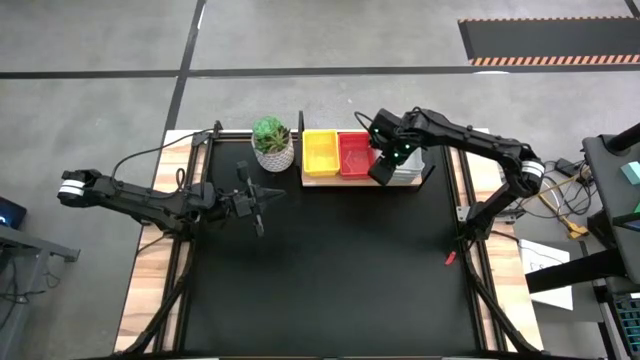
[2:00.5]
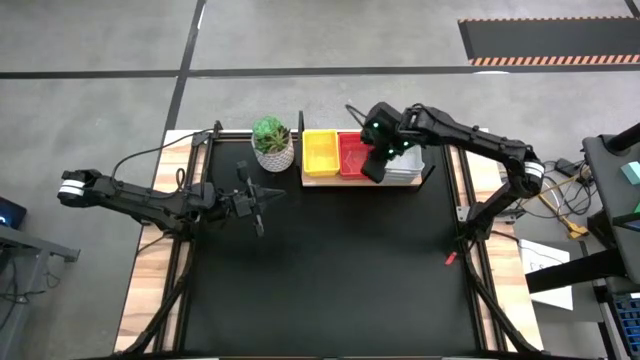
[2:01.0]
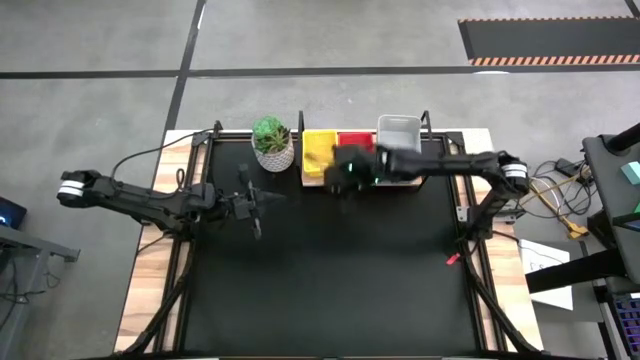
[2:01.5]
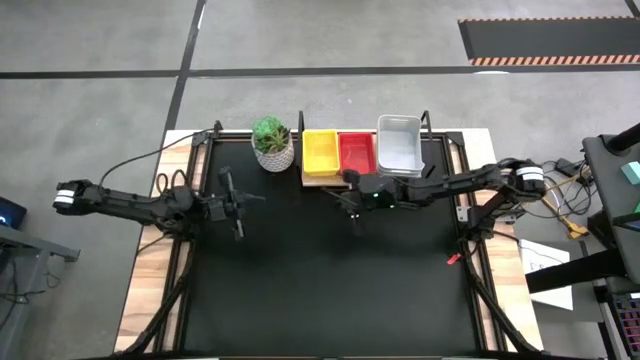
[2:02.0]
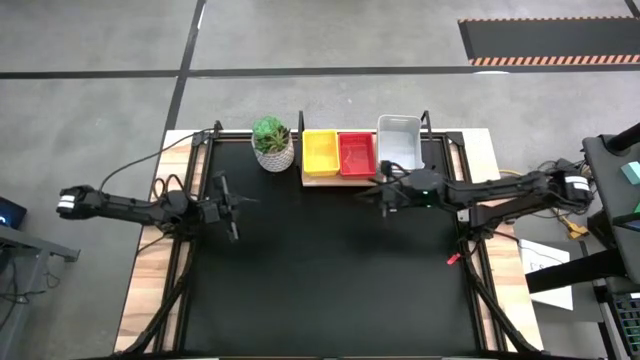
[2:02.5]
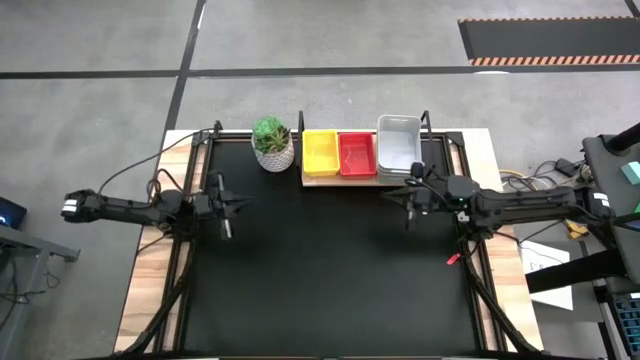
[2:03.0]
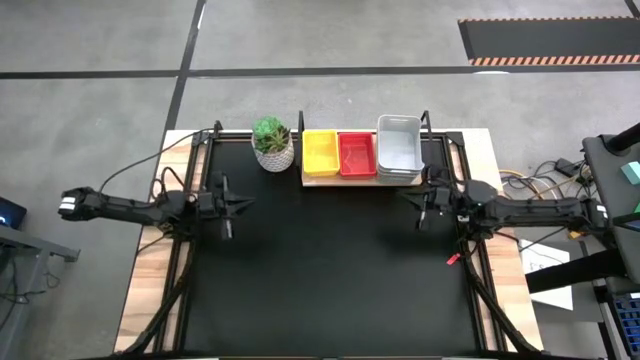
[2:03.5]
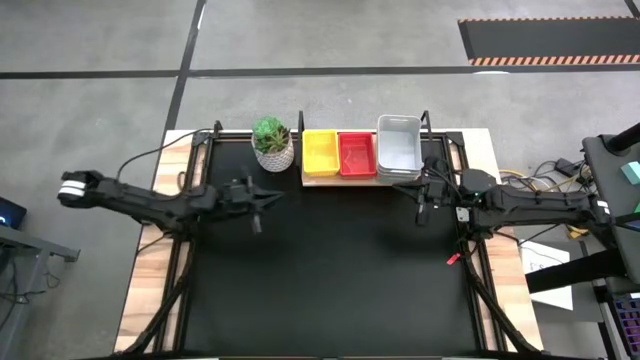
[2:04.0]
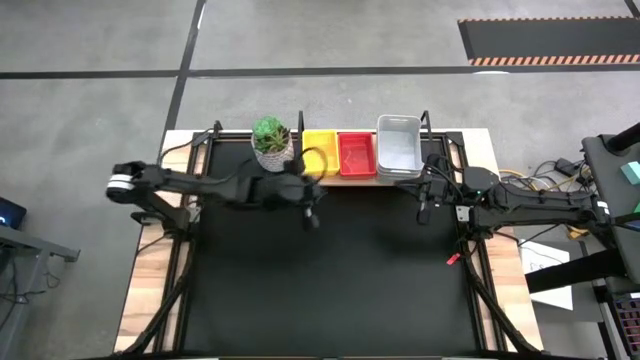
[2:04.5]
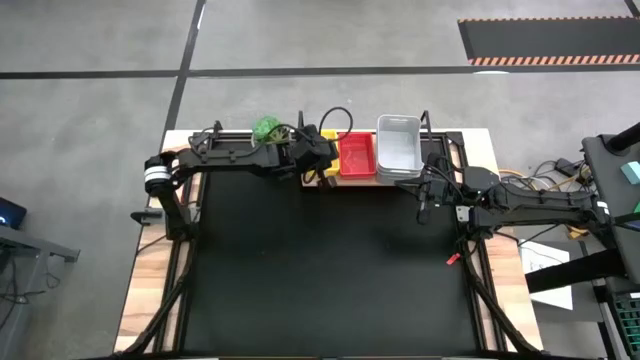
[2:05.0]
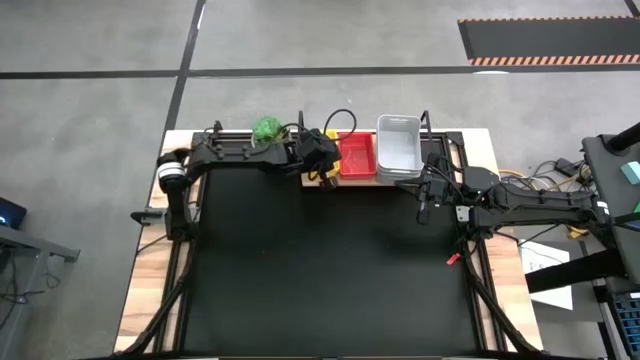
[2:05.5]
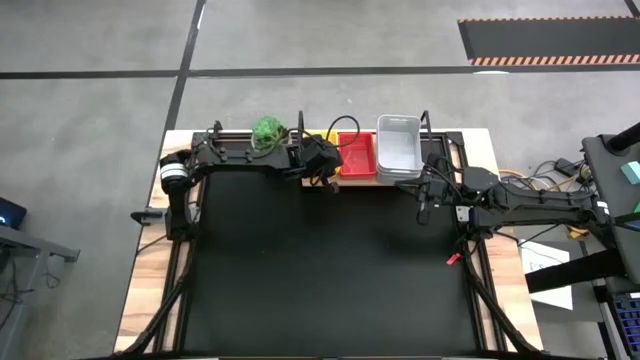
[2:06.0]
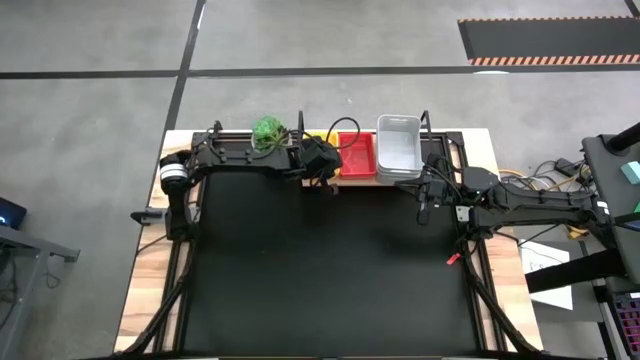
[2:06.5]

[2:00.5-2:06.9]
Task: Stack baskets on shelf by color
Adjust the yellow bin on the shelf

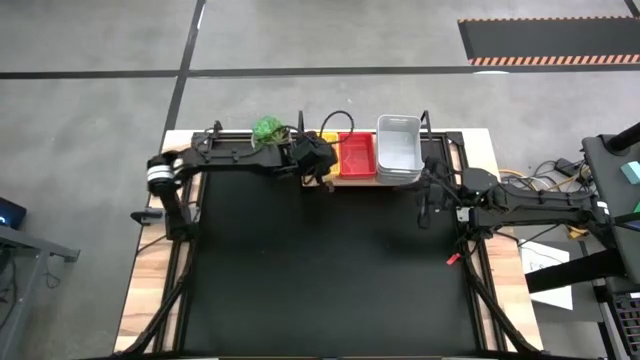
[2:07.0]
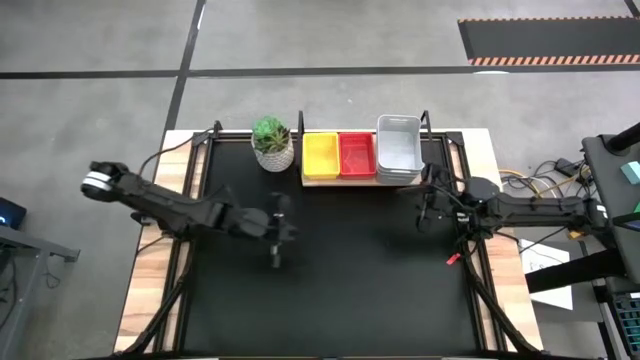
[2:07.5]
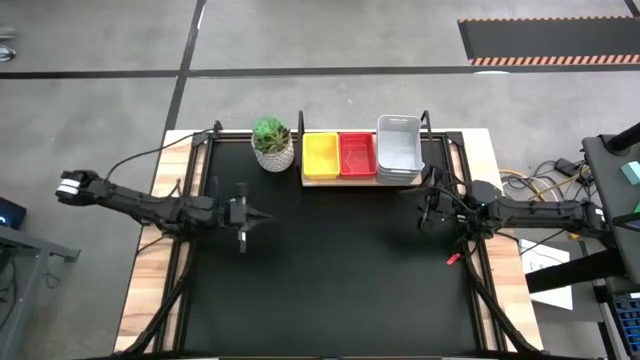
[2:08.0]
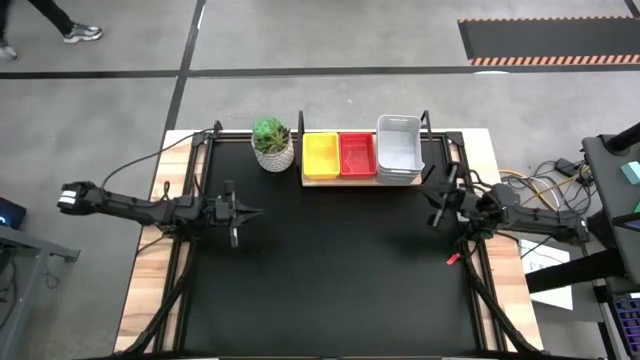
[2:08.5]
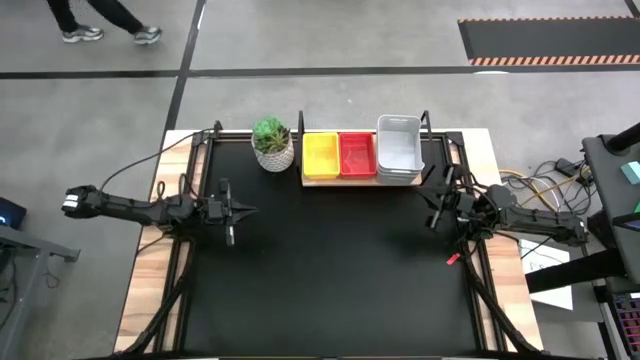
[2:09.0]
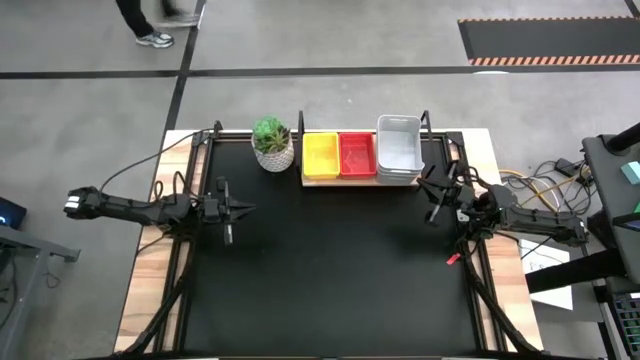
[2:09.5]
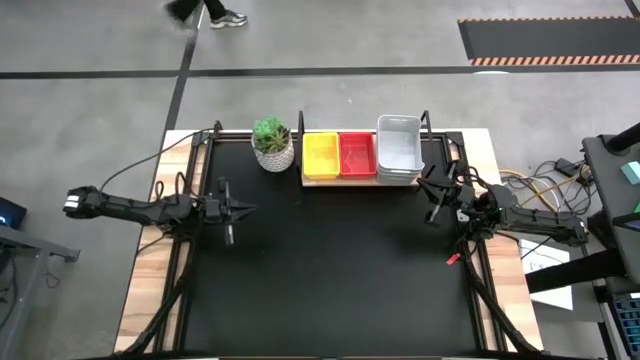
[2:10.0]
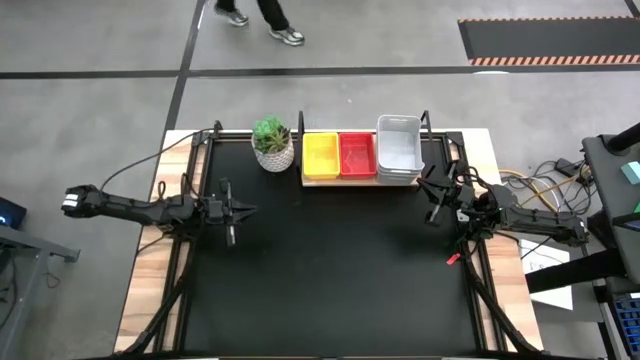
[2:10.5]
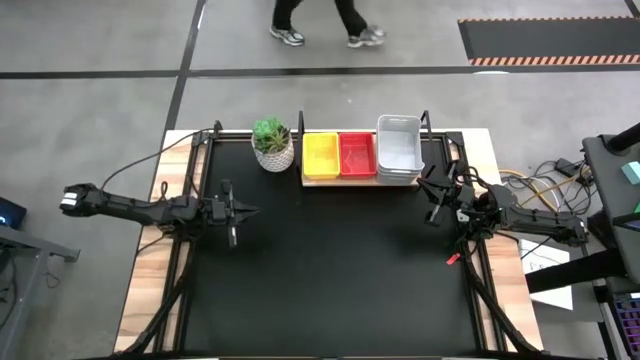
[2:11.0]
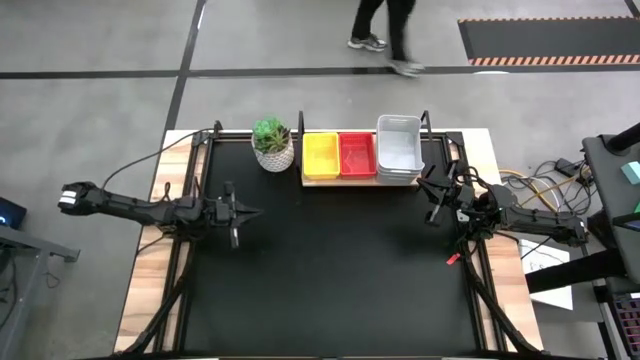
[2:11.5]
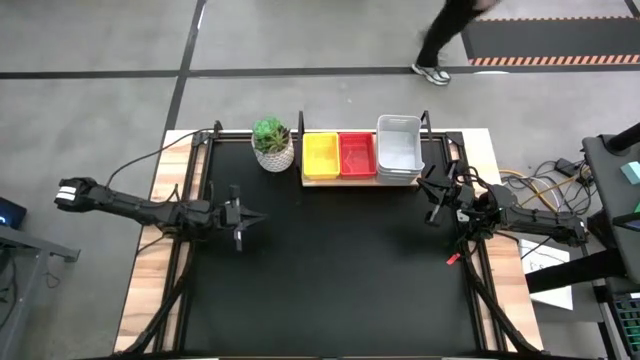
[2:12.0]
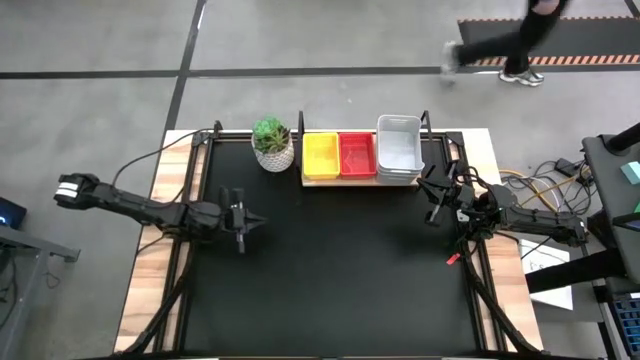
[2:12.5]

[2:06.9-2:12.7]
Return to Home Position

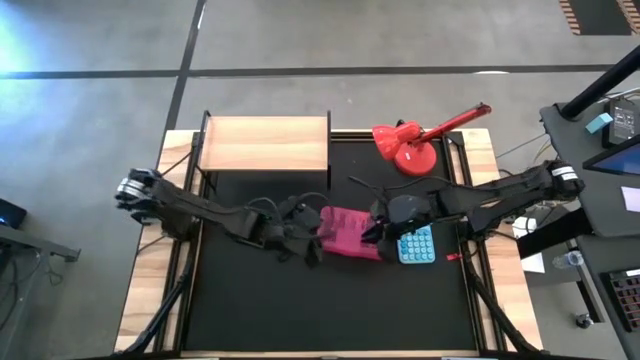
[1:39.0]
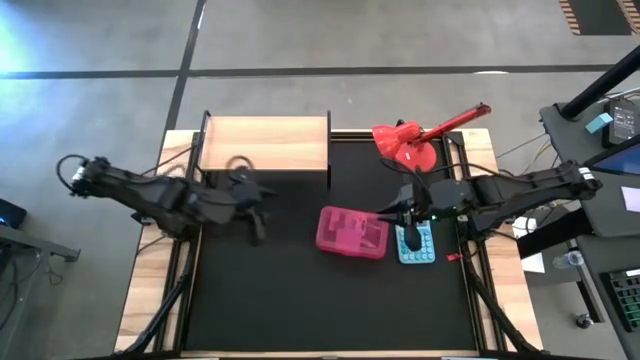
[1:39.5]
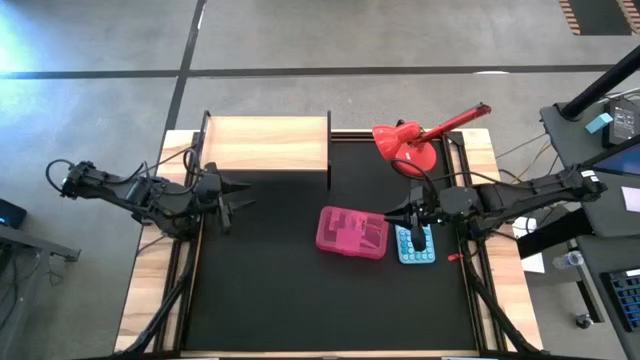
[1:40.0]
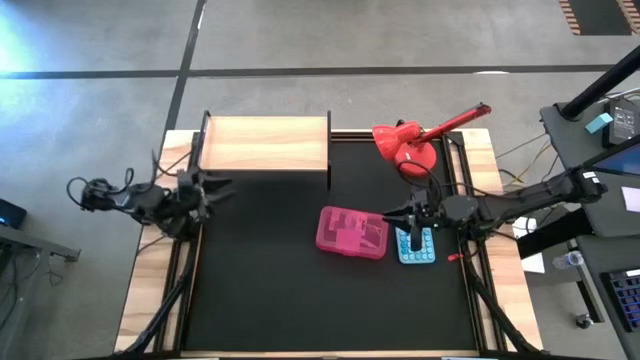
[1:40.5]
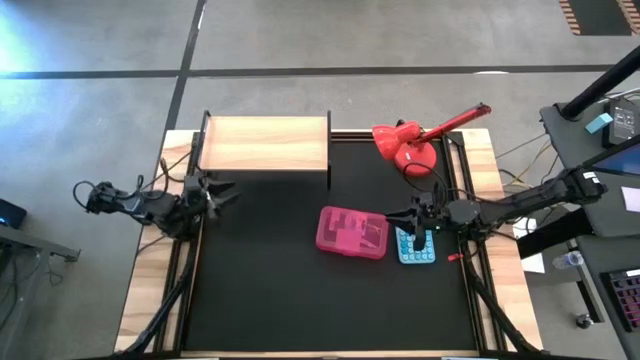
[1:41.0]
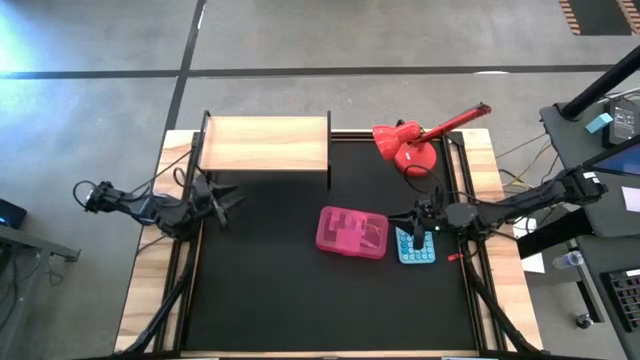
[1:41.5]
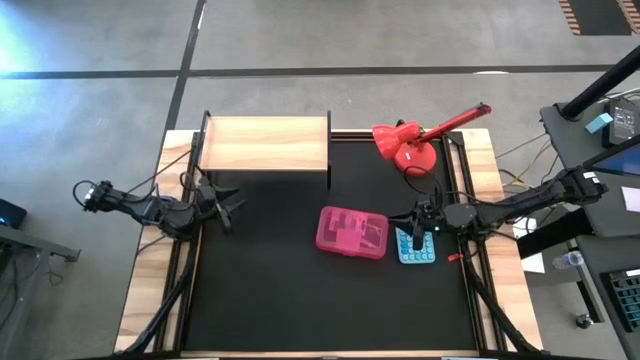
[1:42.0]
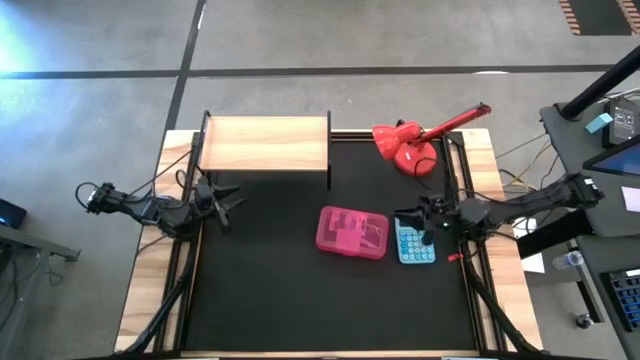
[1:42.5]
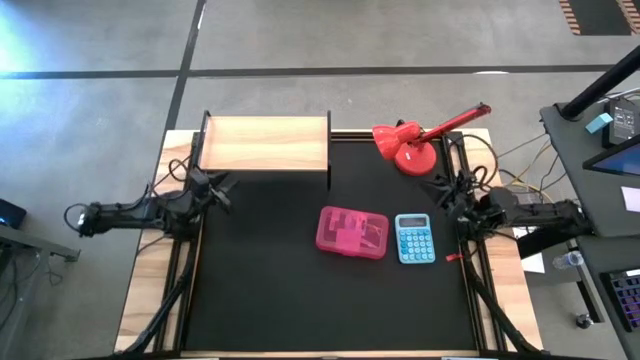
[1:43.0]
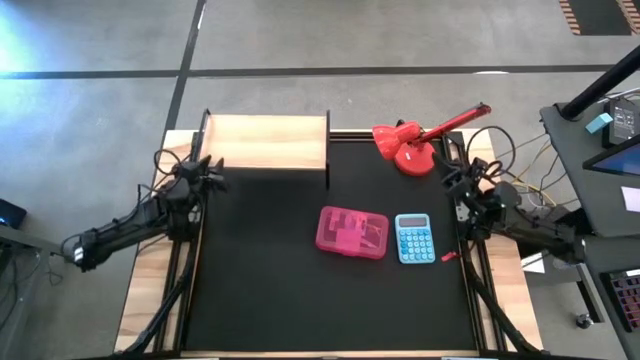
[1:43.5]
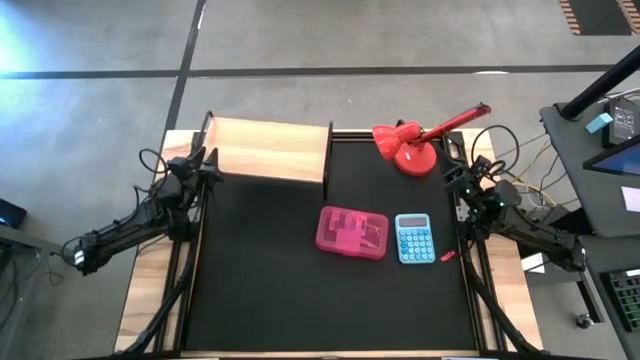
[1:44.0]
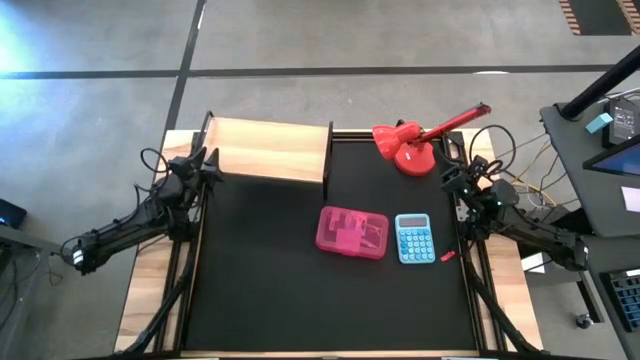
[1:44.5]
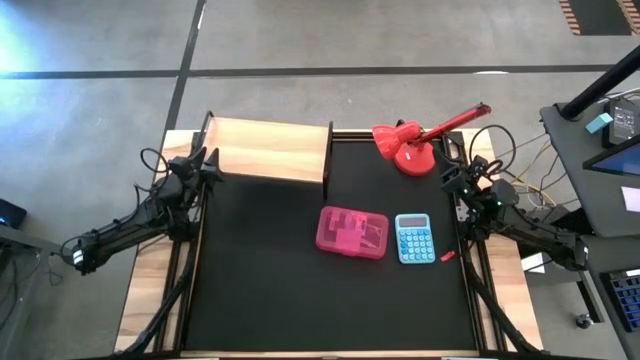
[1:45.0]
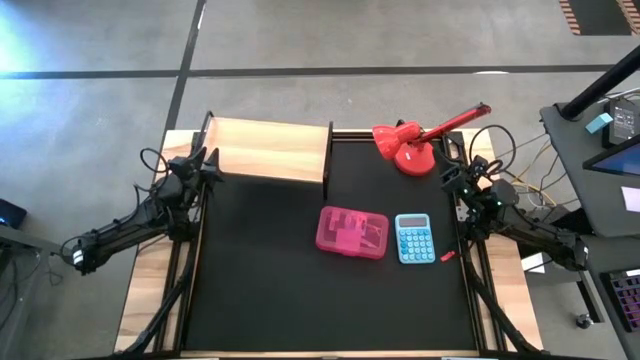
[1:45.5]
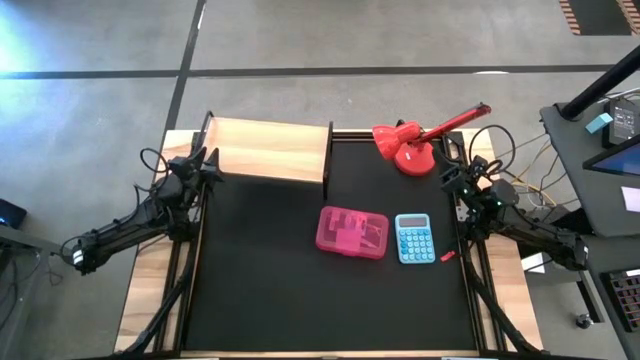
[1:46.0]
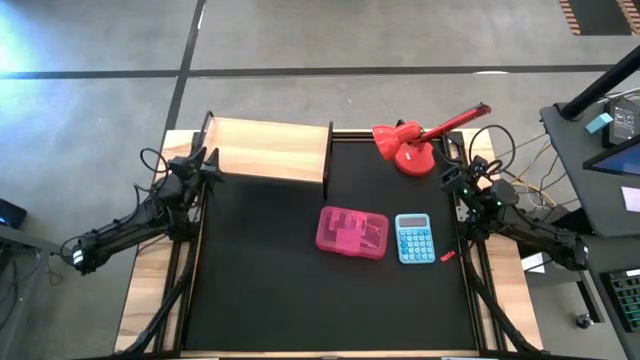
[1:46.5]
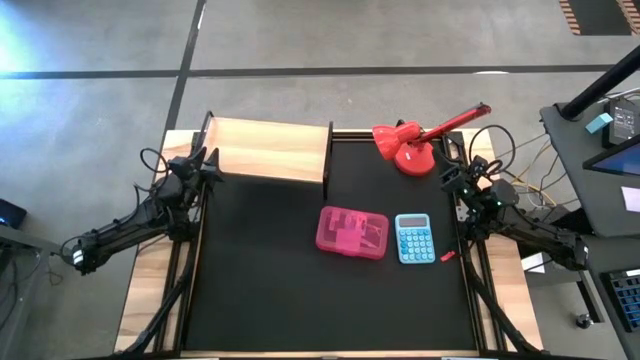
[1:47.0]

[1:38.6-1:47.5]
Task: Pack school essentials
Return to Home Position
